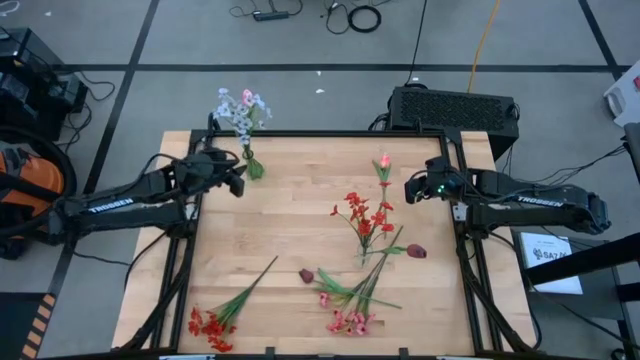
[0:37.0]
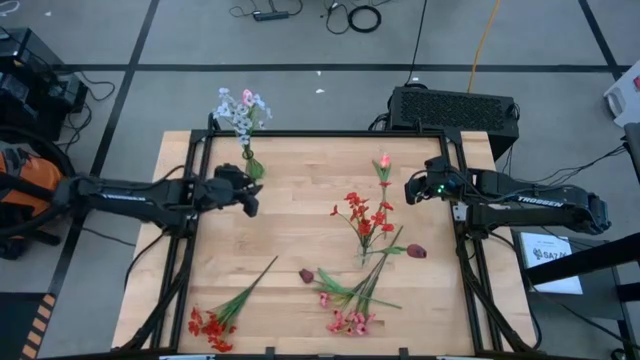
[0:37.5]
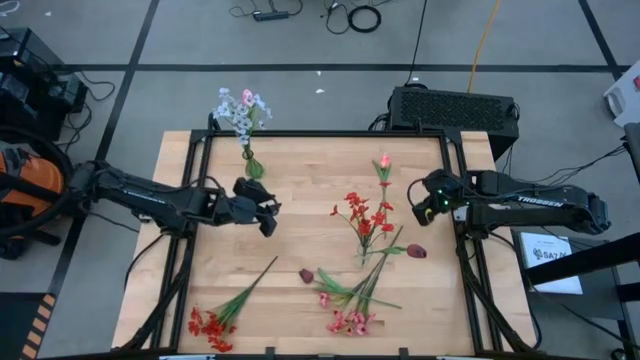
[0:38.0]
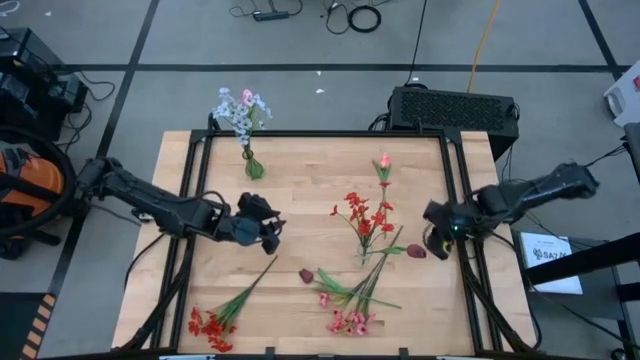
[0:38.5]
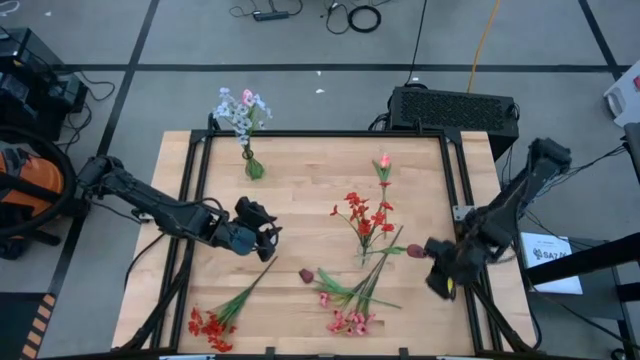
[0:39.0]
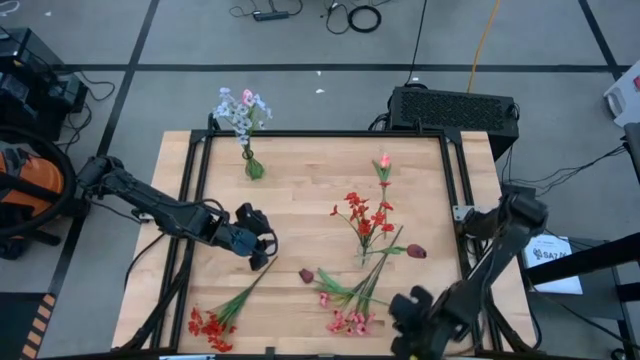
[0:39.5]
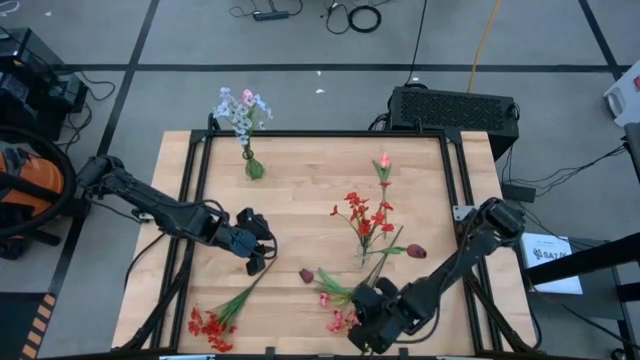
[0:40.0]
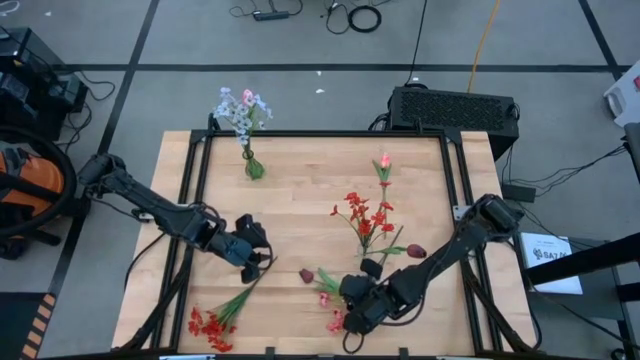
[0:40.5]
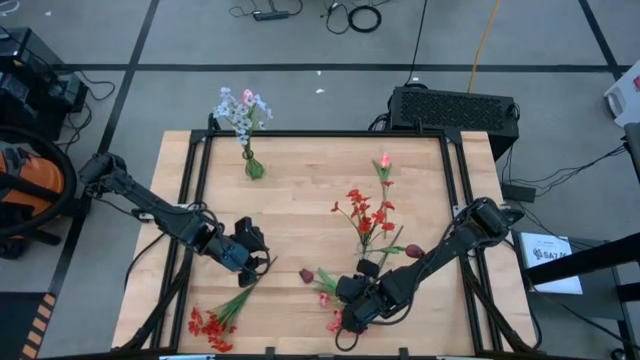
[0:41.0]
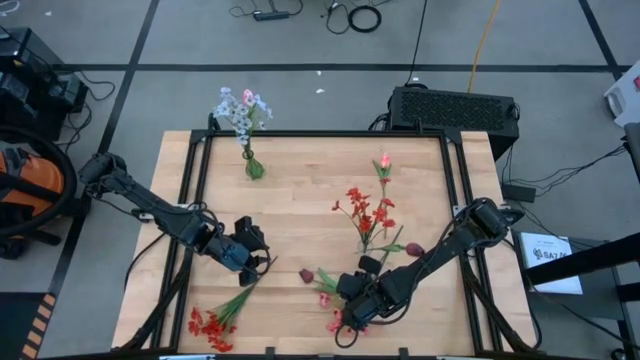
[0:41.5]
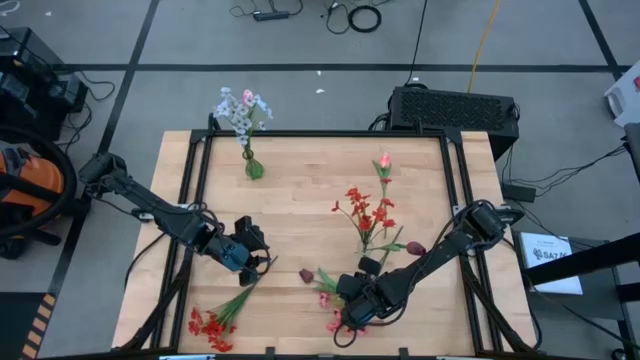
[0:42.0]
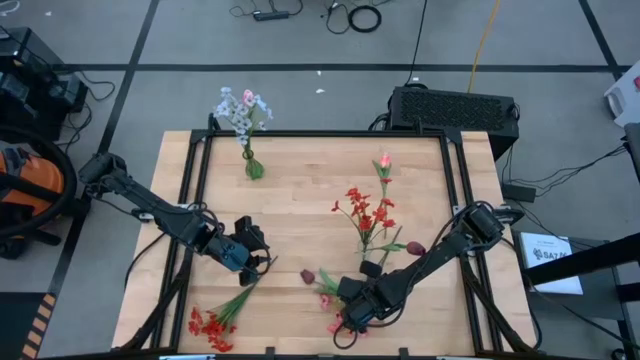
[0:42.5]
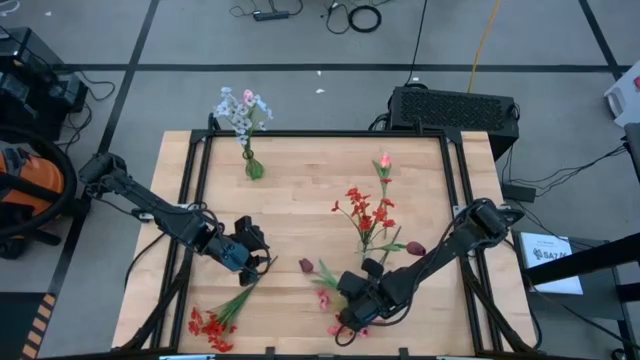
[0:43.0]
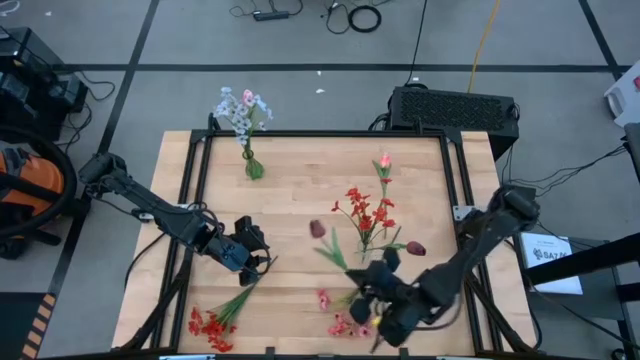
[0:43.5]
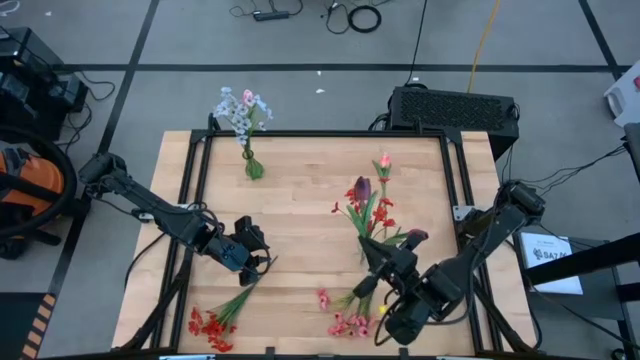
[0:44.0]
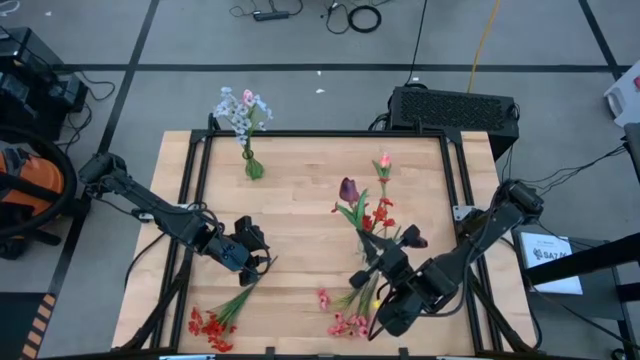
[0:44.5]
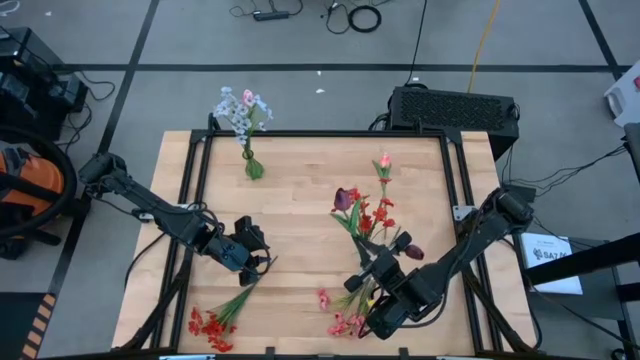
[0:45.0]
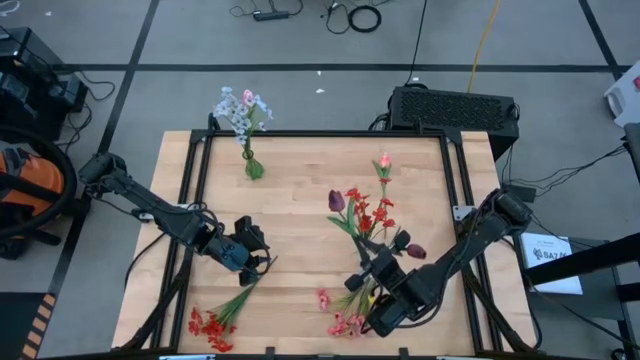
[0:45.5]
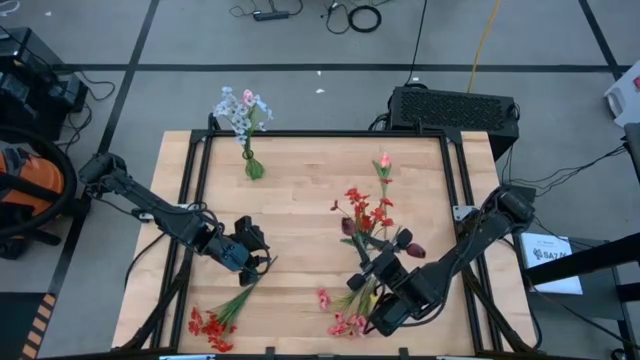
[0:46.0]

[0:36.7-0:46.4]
Task: Sort flowers into vase by color
Put the red flower into the transparent vase

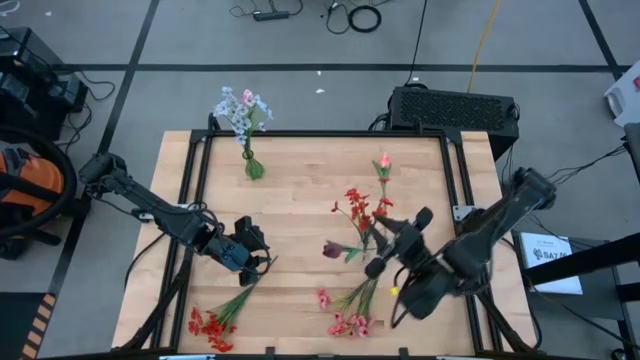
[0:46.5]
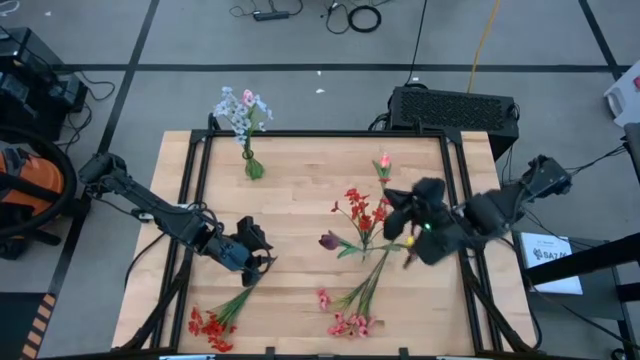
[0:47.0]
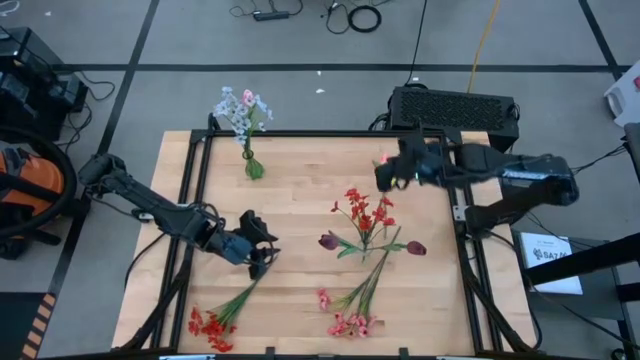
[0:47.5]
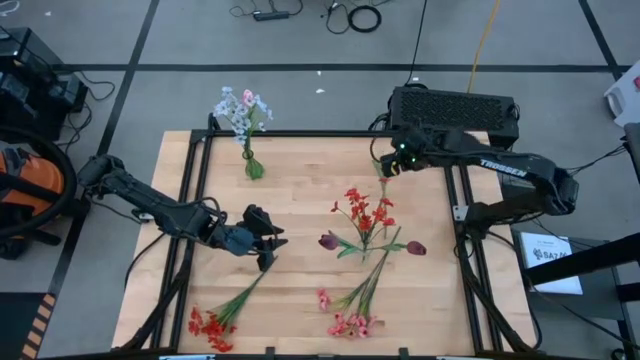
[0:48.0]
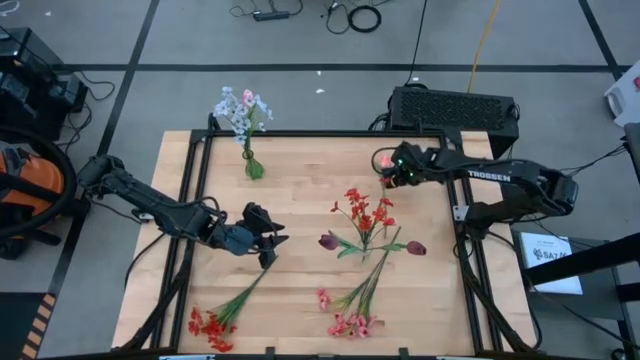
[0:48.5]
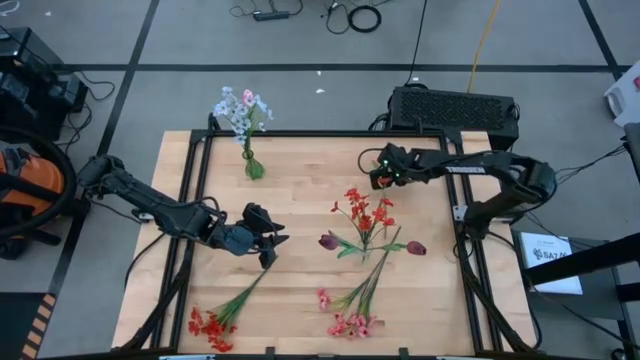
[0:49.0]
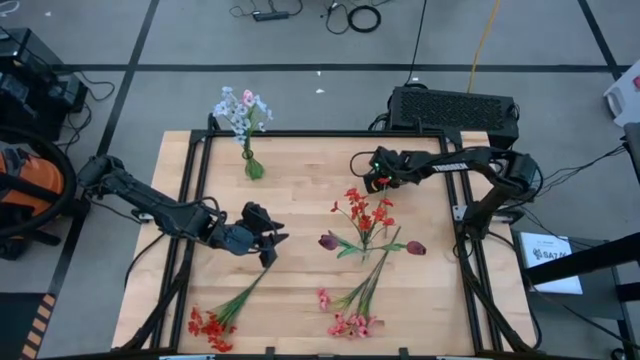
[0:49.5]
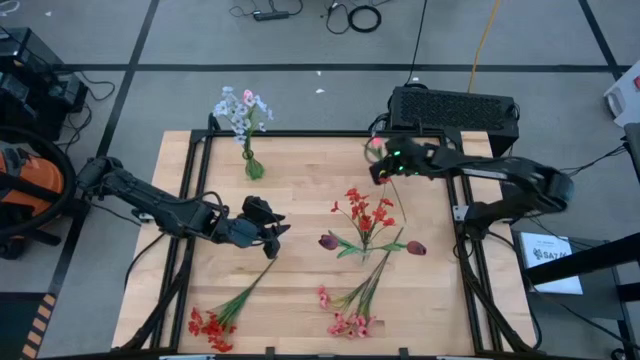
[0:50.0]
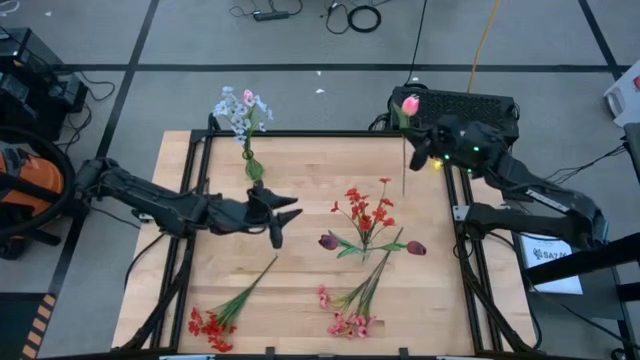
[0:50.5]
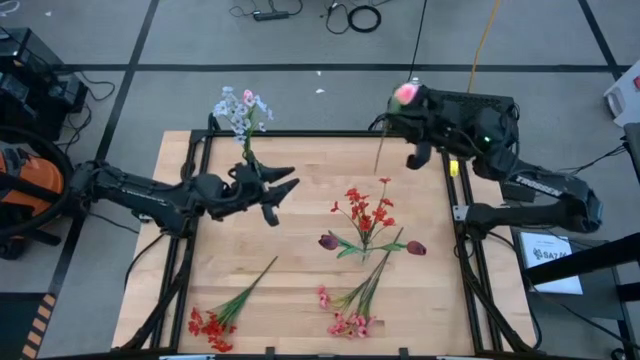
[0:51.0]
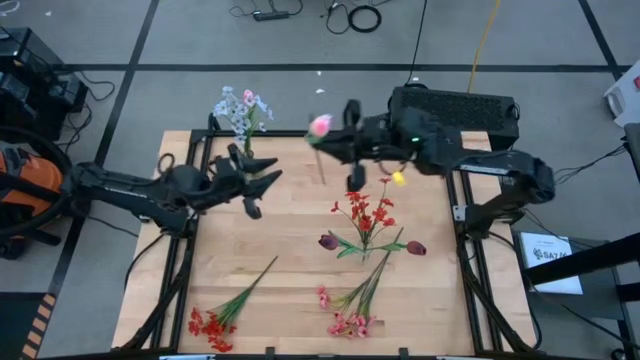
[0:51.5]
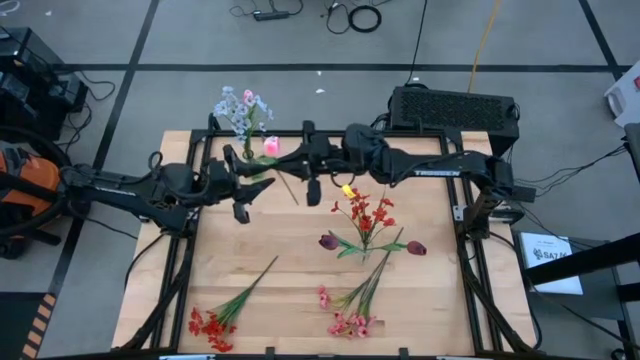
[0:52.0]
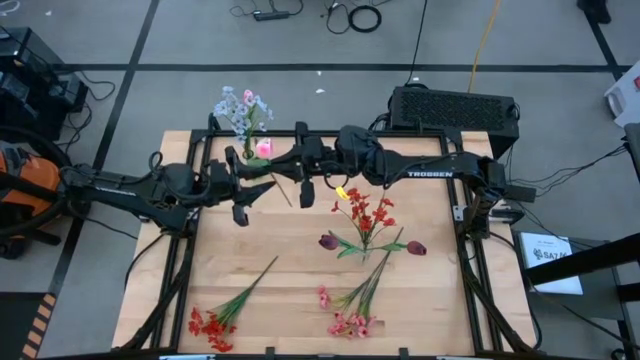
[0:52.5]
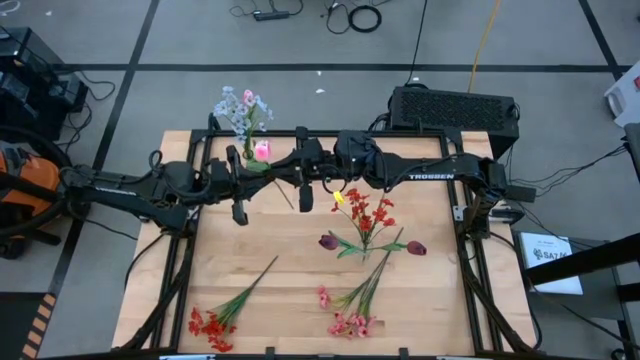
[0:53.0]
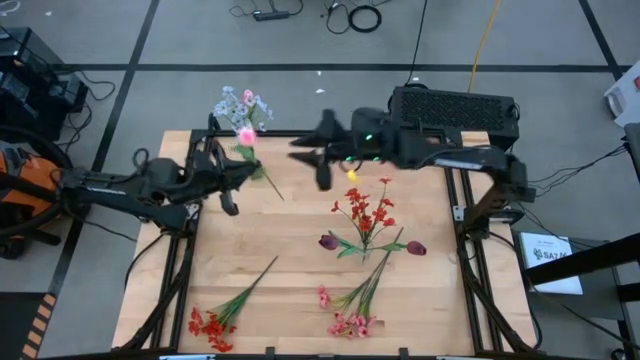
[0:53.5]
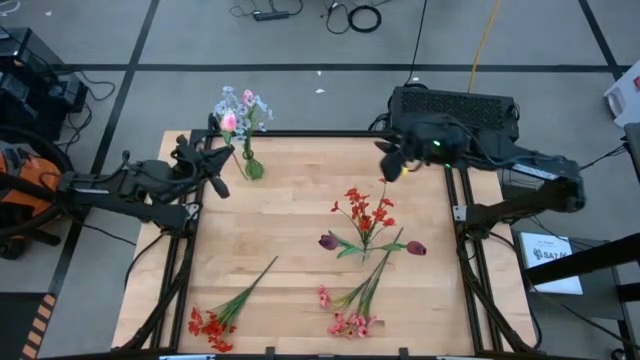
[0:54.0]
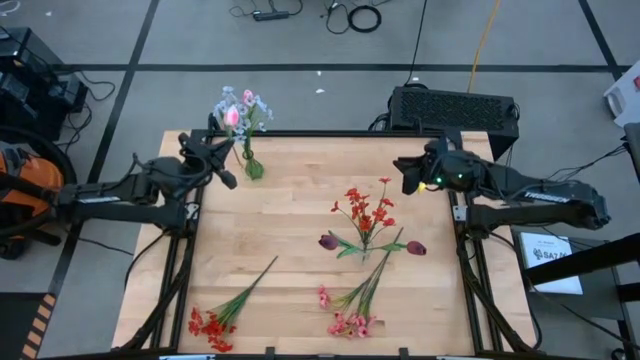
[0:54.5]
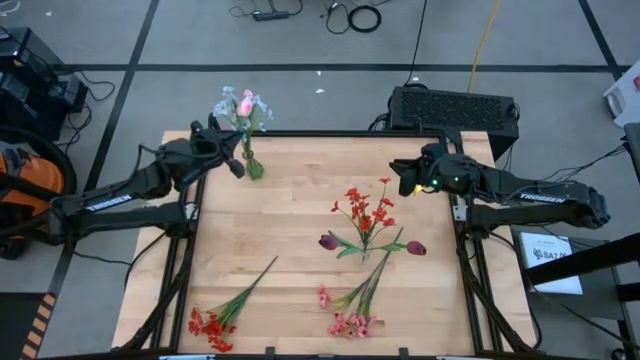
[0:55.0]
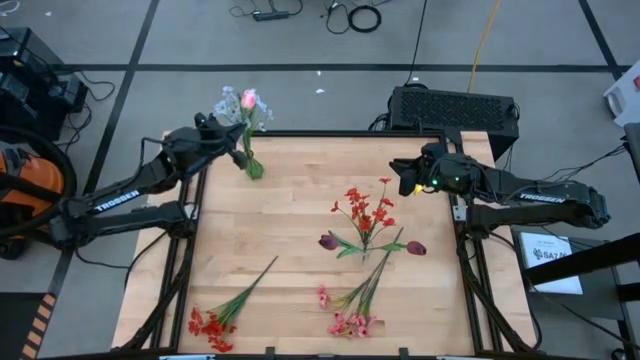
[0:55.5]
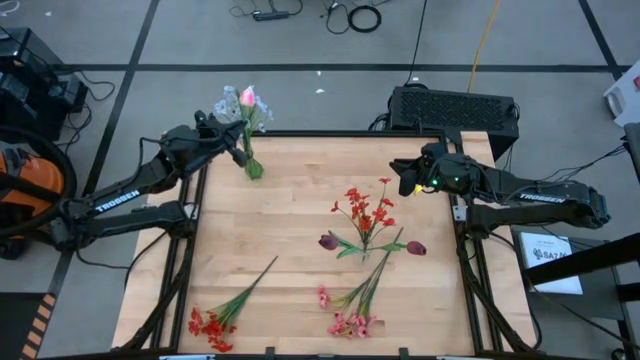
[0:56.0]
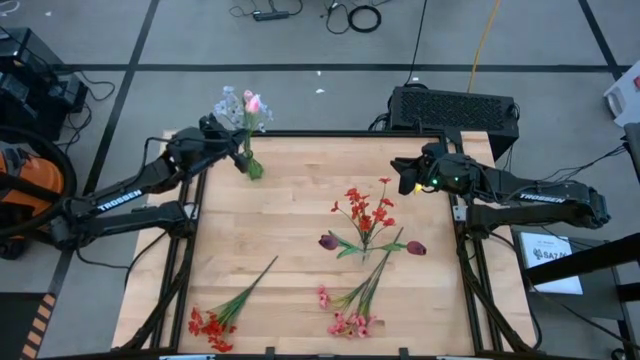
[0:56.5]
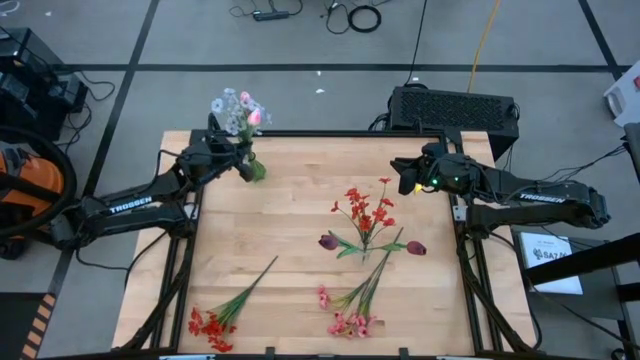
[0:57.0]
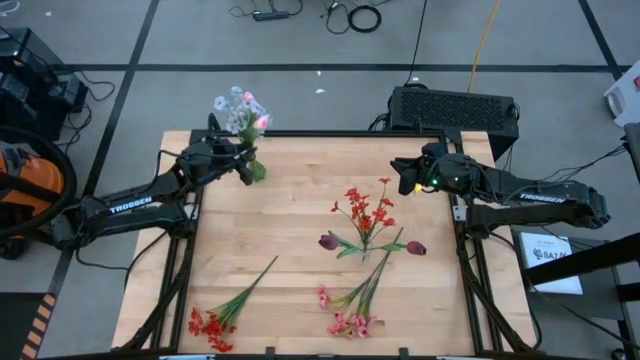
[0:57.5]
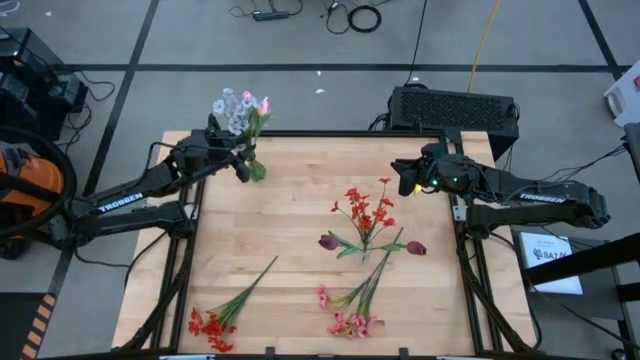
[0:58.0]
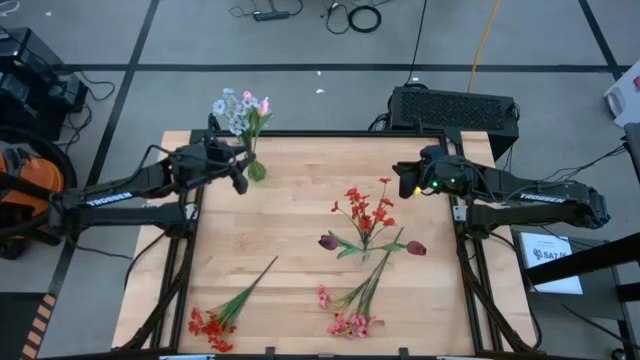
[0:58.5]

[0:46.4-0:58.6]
Put the pink flower into the green vase
